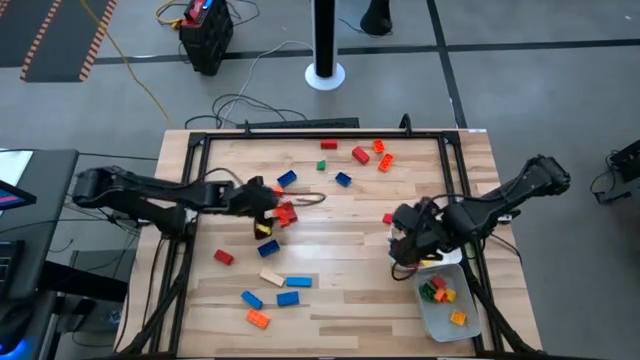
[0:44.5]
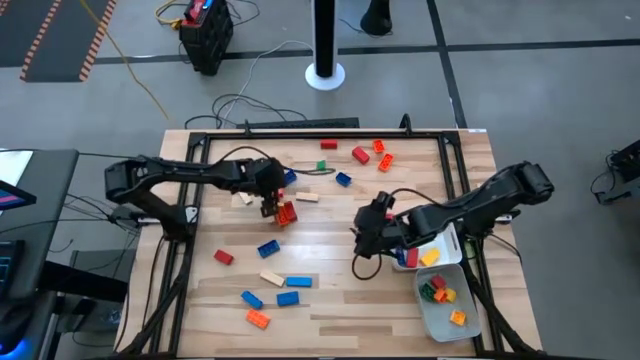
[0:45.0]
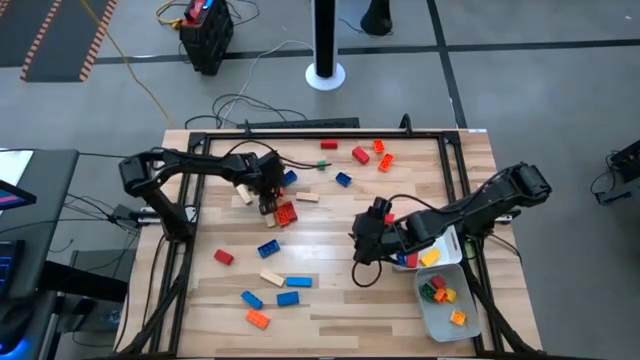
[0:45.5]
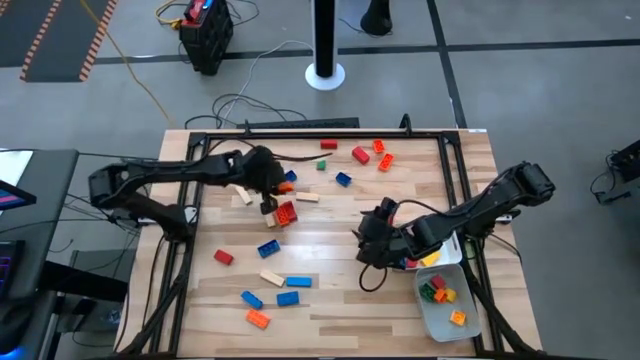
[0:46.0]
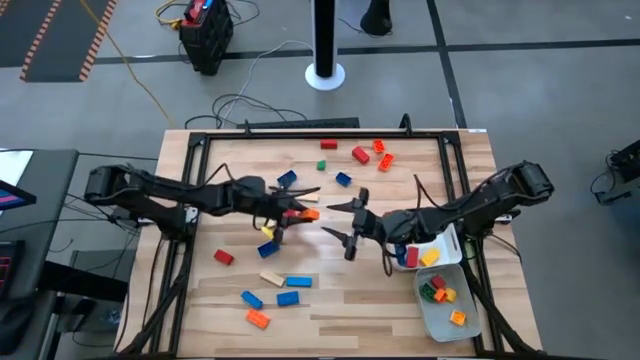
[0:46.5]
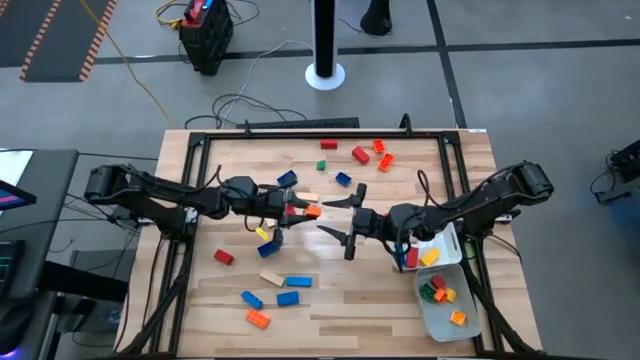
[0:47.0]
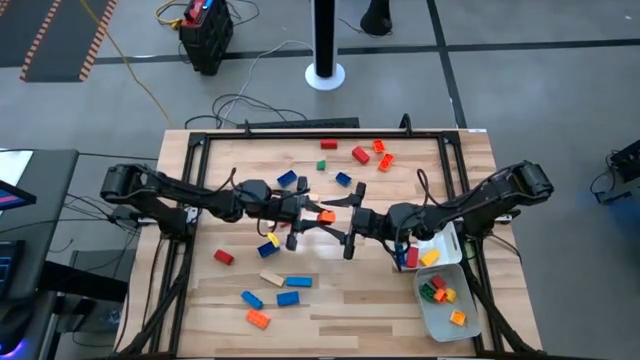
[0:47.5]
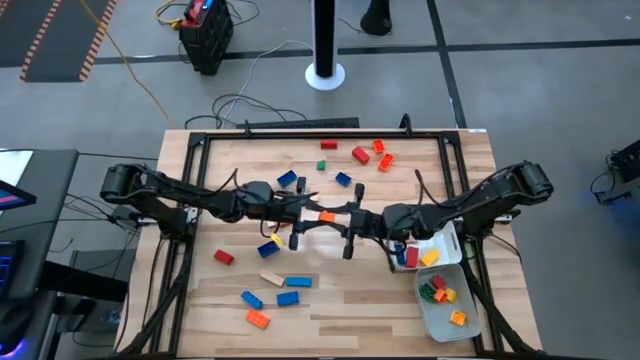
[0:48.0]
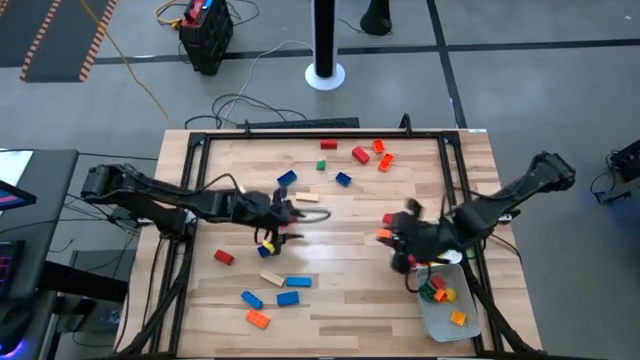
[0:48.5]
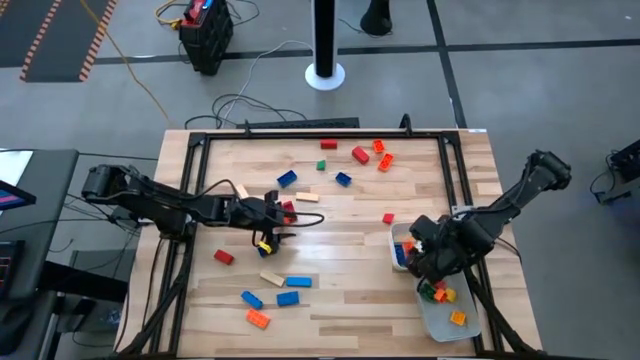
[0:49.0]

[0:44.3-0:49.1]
Task: Sort blocks by size
Put the 8 stud orange game piece into the white bin

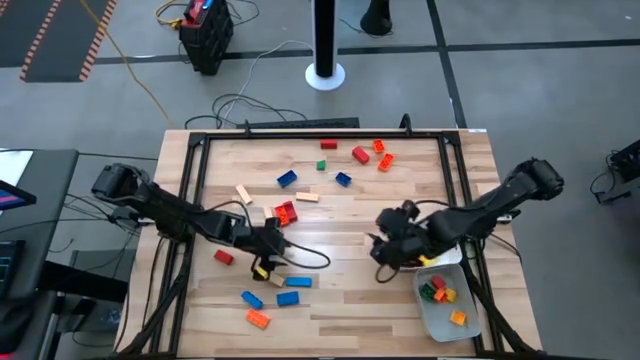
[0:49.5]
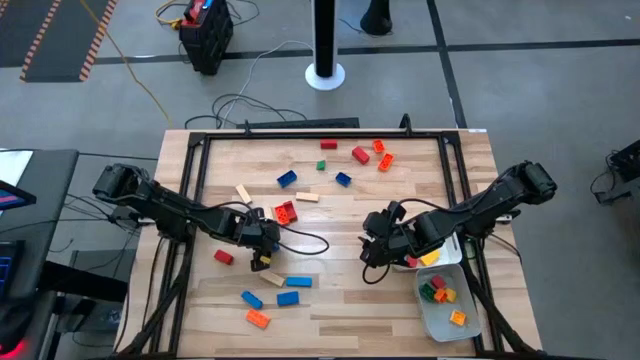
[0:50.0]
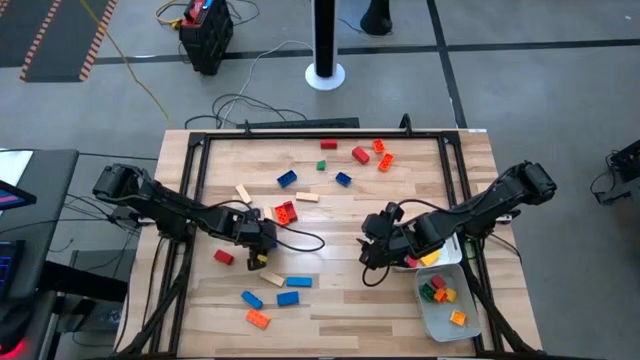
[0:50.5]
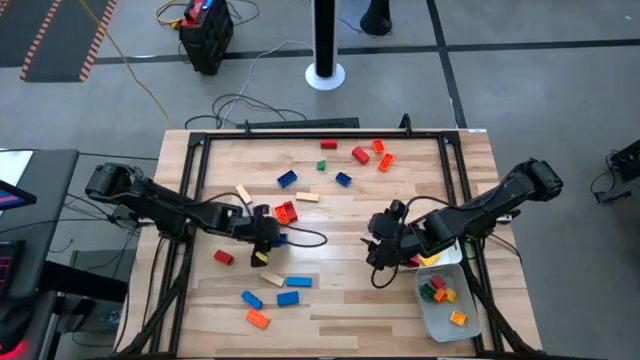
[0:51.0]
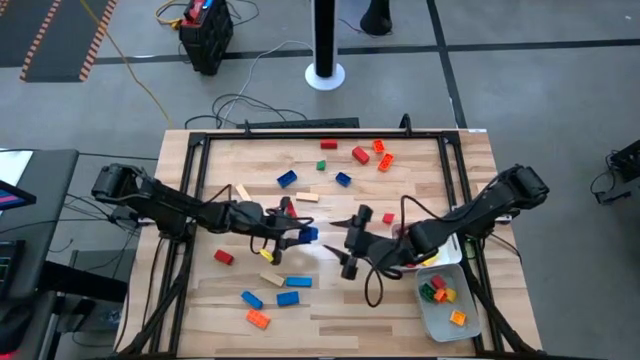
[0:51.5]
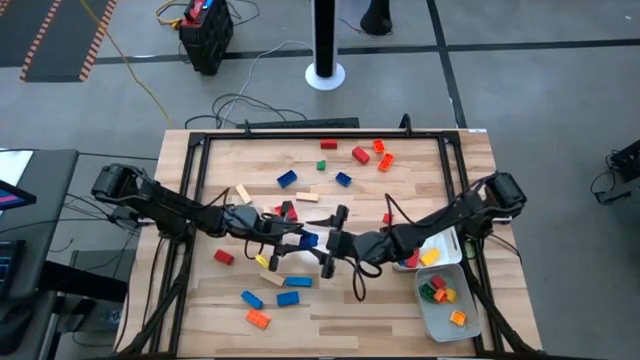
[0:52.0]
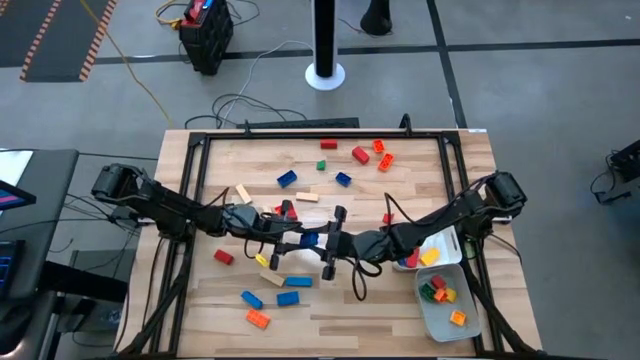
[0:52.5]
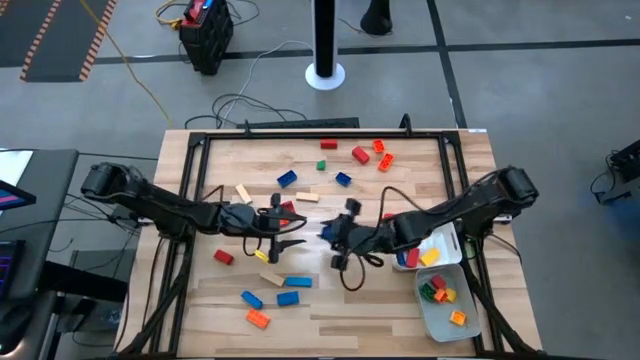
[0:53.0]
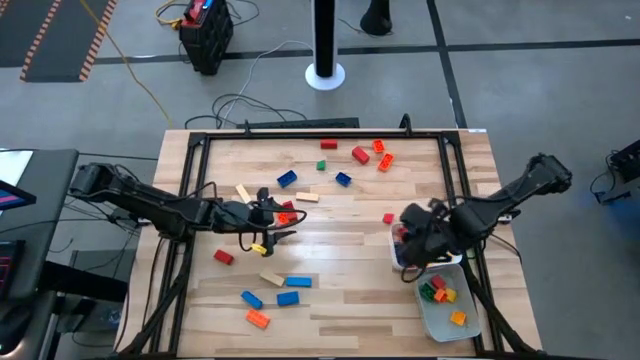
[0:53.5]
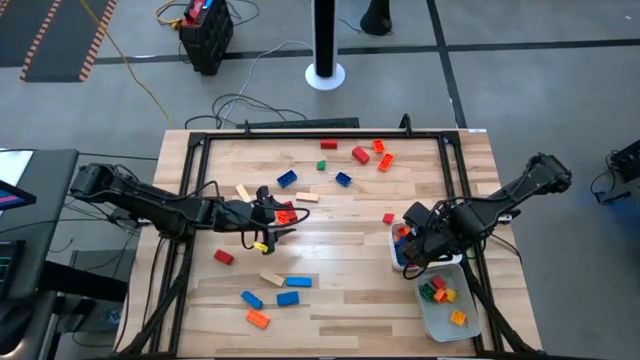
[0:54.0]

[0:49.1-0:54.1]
Put the 8 stud blue game piece into the white bin

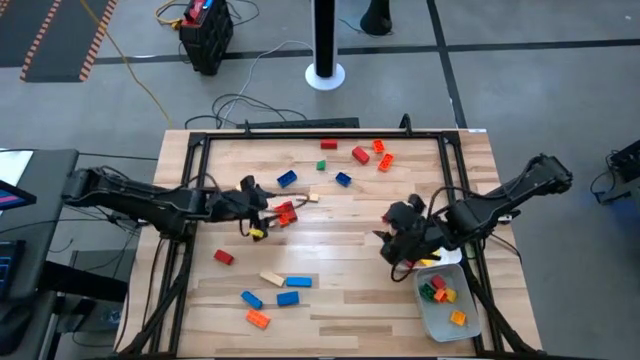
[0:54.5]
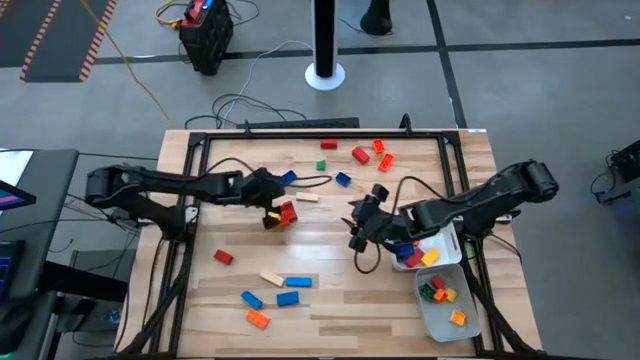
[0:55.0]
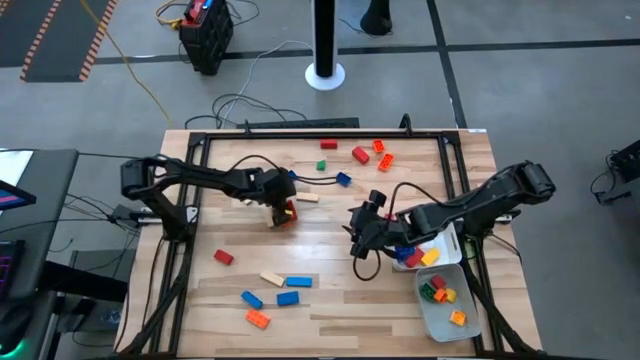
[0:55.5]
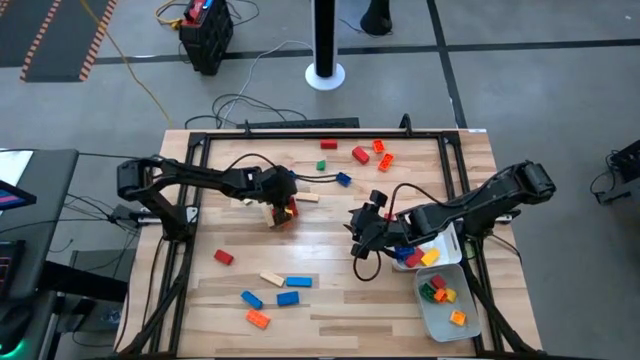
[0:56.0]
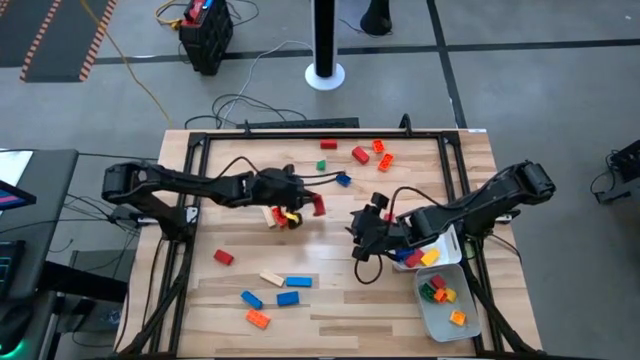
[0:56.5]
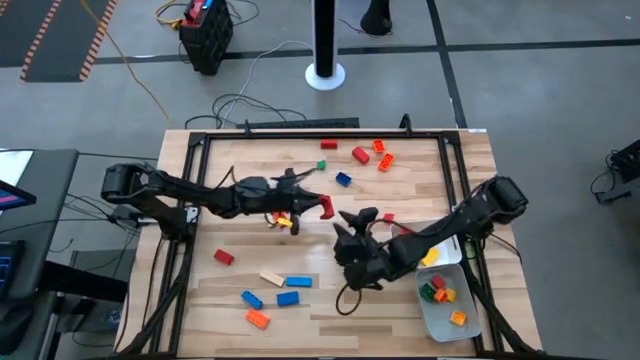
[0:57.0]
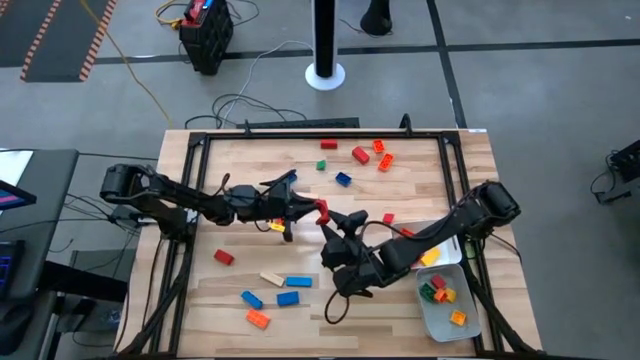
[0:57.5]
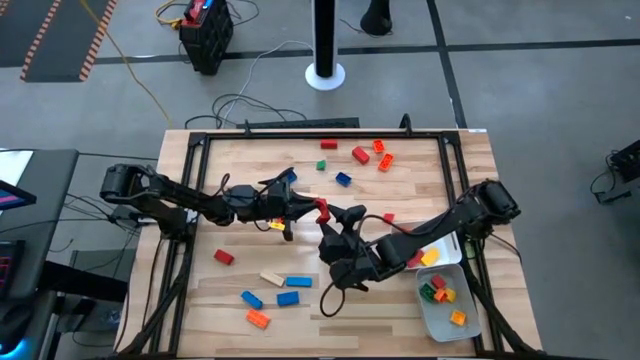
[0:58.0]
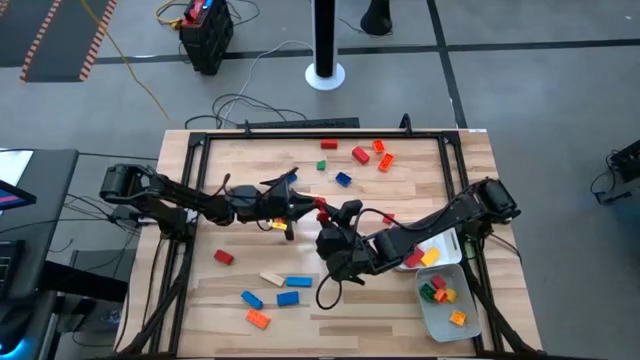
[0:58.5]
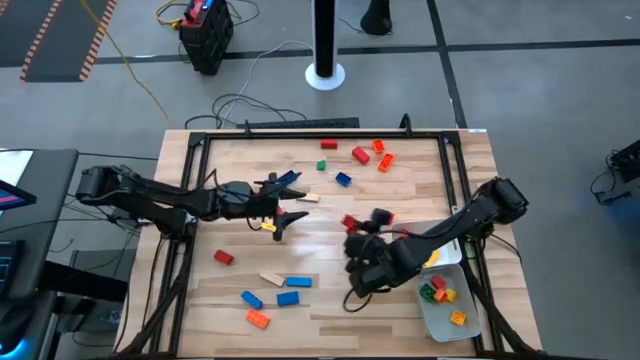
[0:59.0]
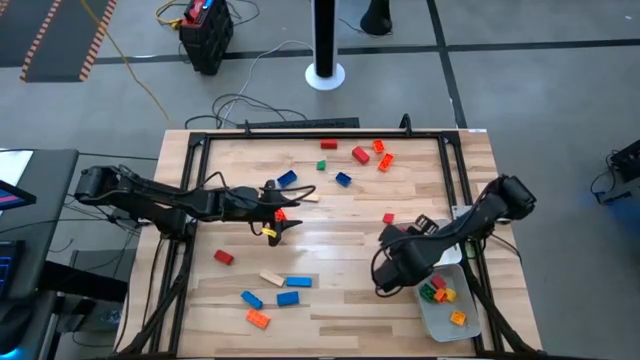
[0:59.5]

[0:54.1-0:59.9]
Put the red block into the white bin

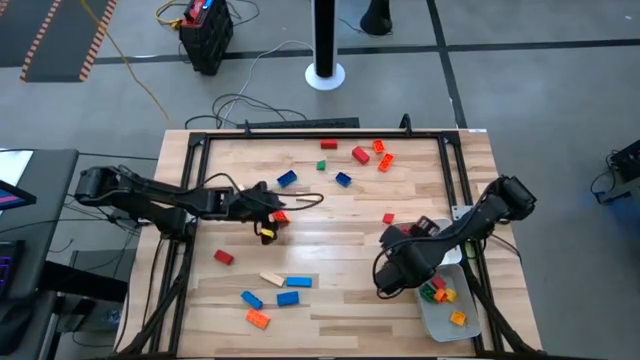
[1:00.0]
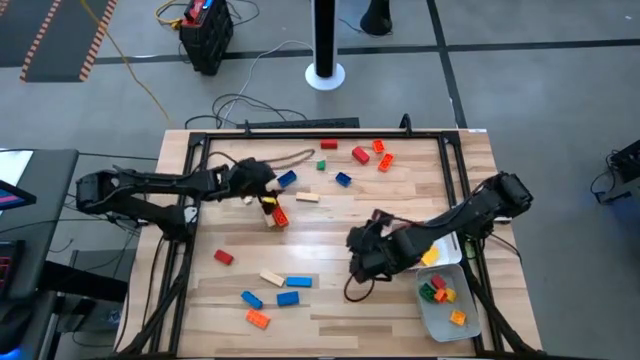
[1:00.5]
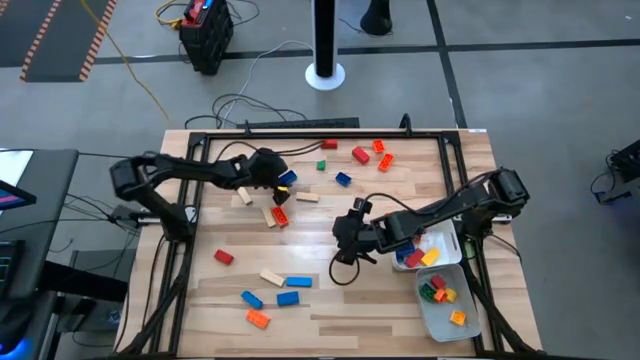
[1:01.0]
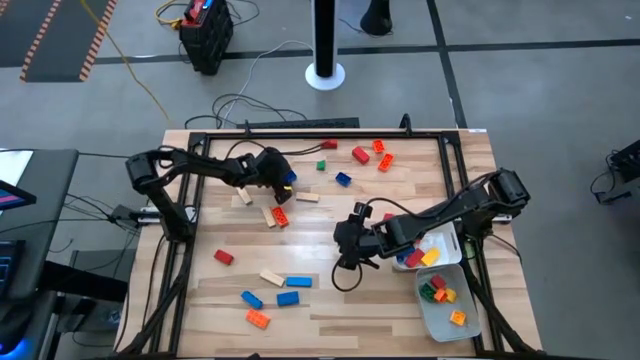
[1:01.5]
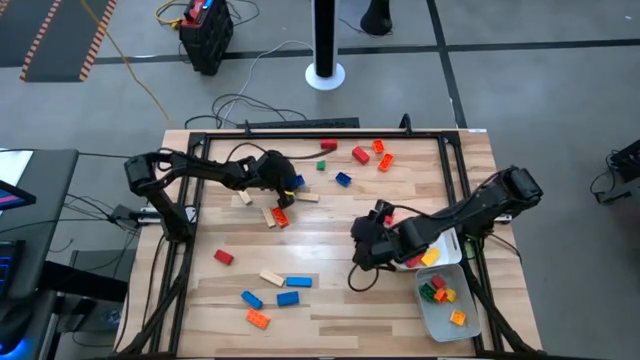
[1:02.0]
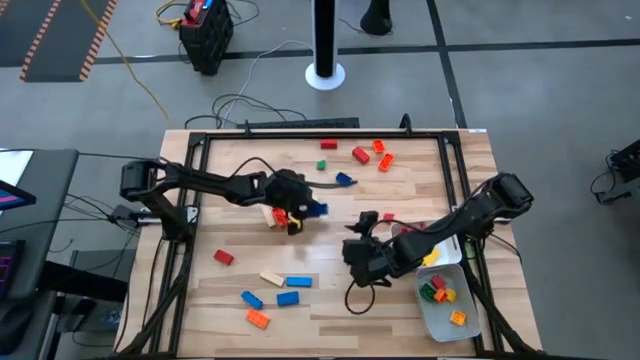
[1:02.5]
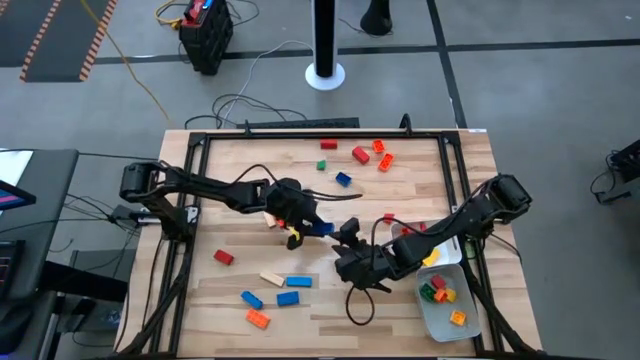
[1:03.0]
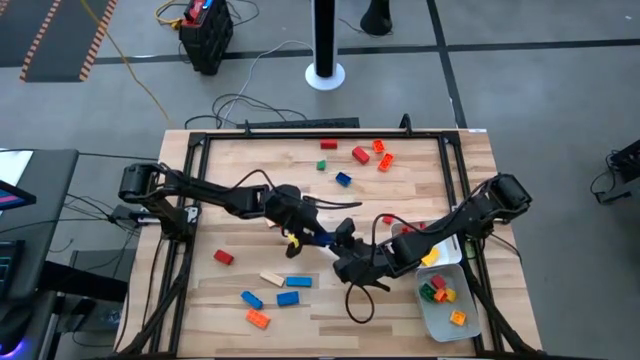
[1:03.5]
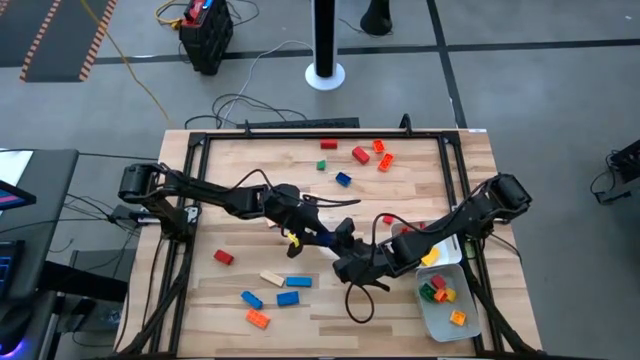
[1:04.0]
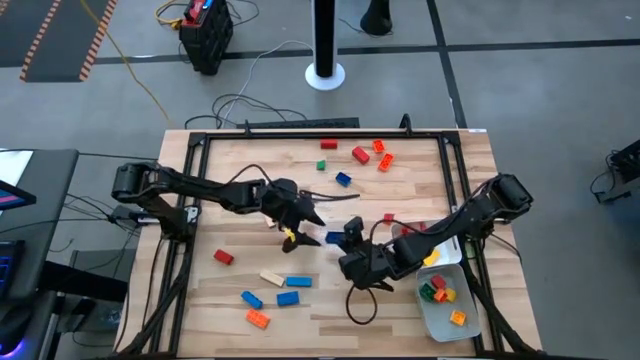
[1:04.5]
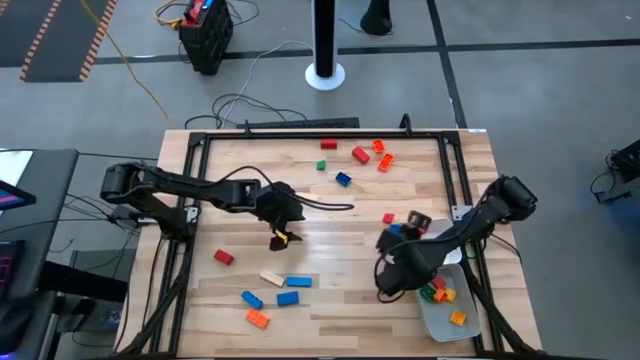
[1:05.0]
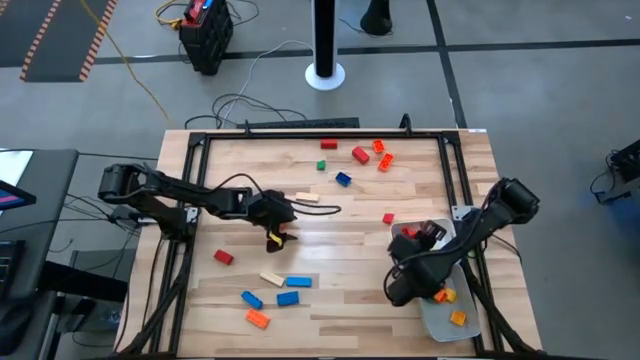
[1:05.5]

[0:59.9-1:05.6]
Put the 8 stud blue game piece into the white bin
